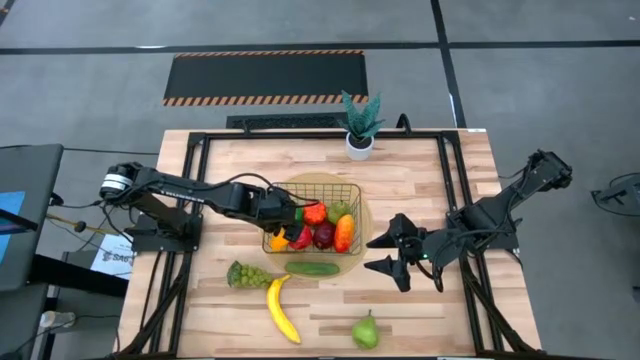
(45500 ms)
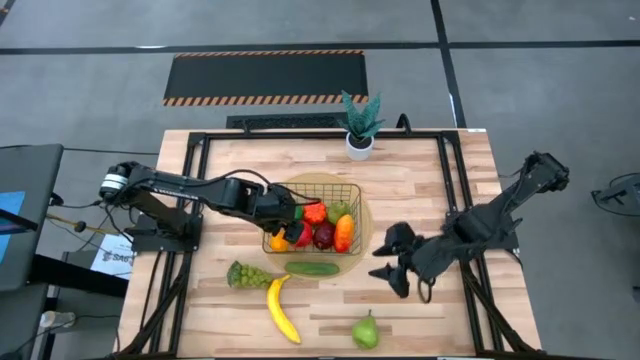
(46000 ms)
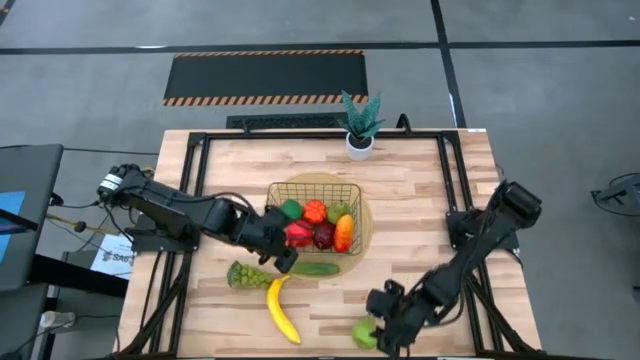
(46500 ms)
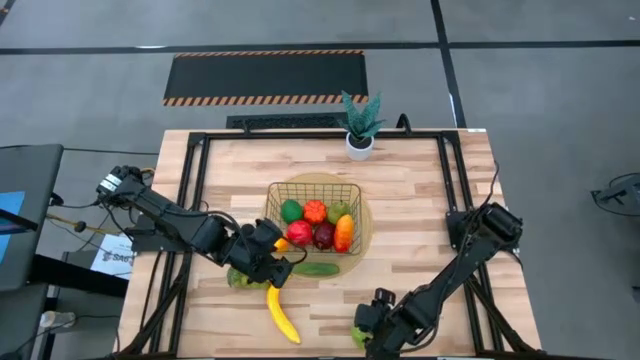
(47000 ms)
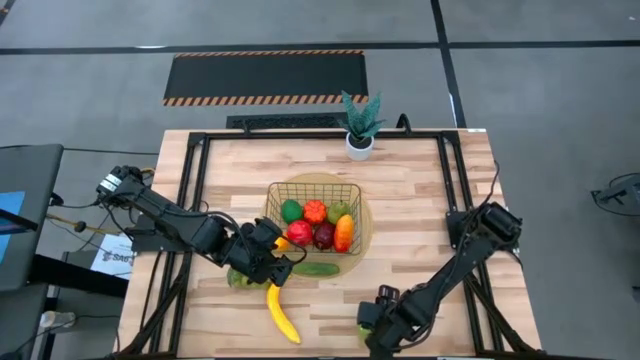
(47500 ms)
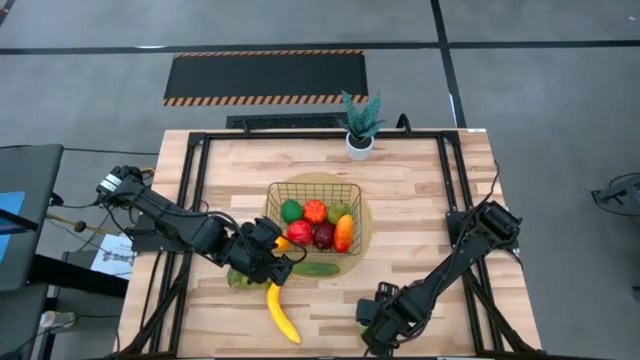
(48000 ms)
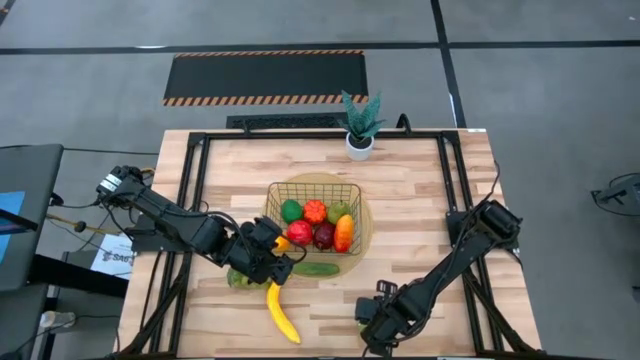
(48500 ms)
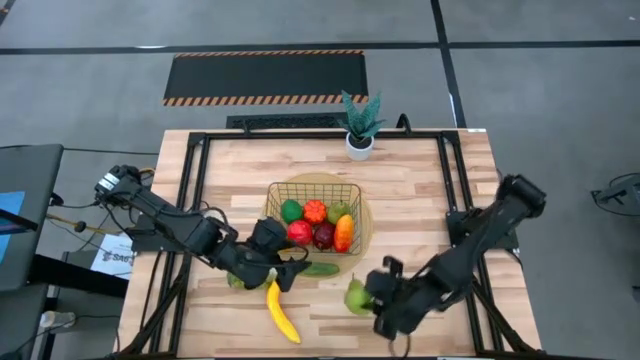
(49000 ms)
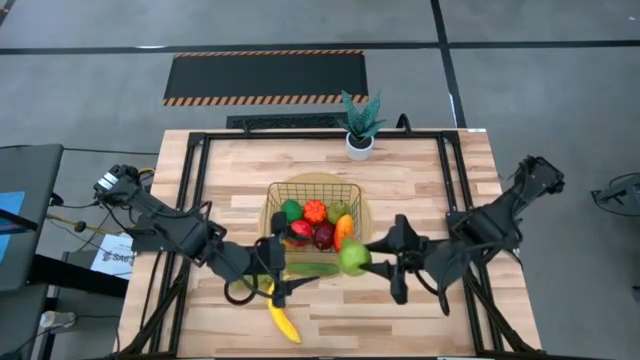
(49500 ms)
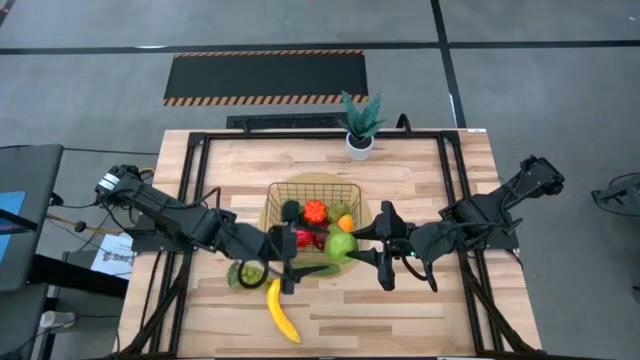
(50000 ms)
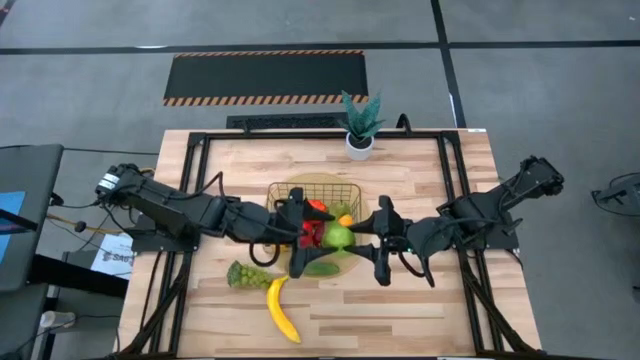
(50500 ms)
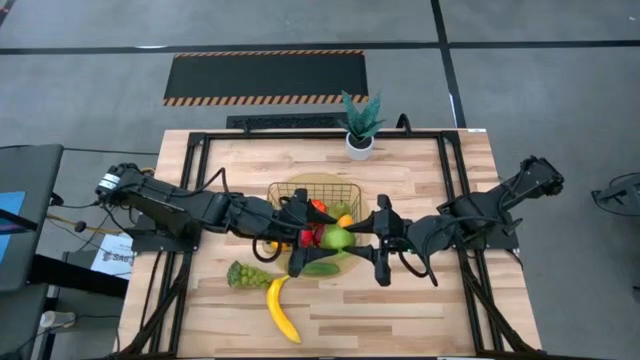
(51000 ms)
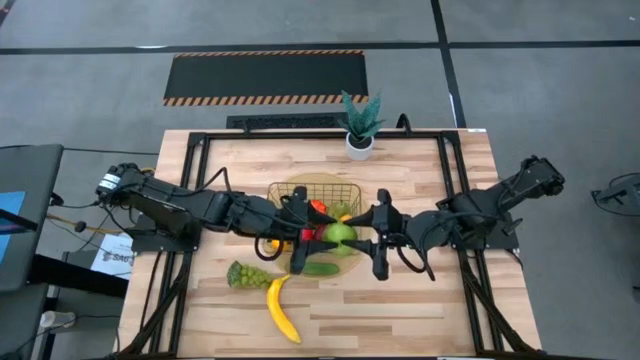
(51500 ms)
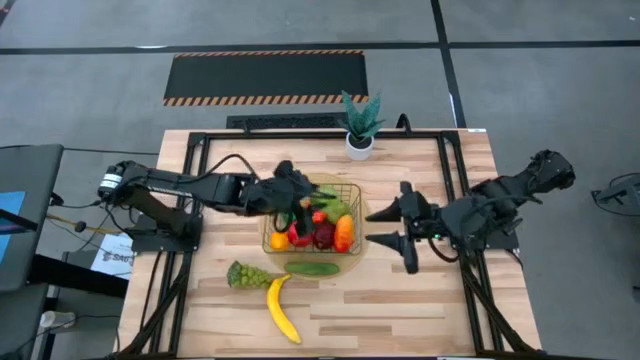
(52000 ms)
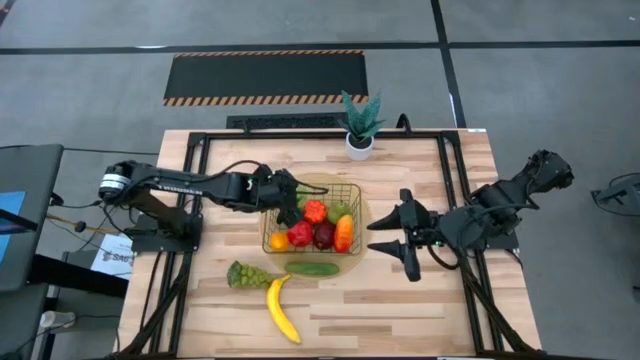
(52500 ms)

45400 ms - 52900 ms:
Task: Build produce basket
Put the pear into the silver basket

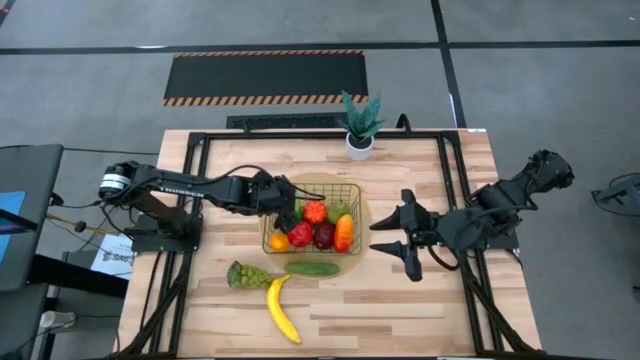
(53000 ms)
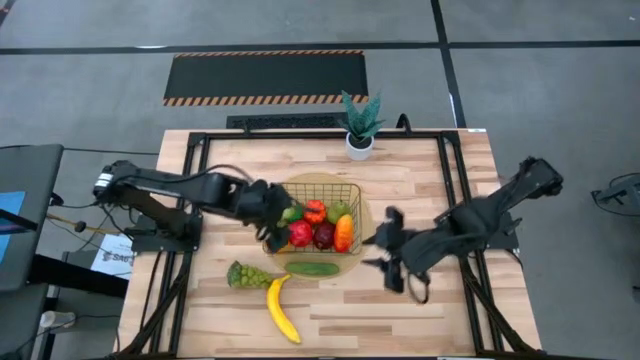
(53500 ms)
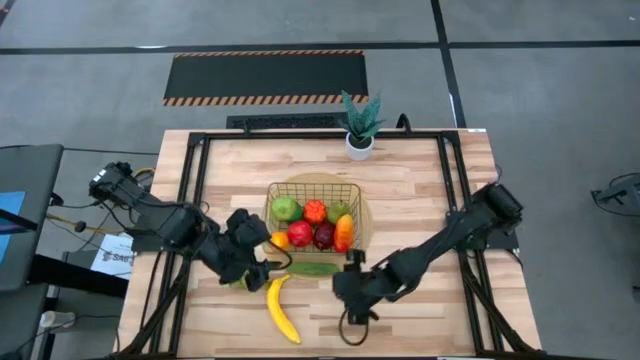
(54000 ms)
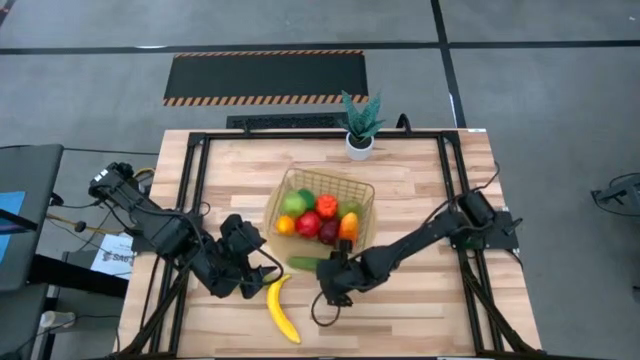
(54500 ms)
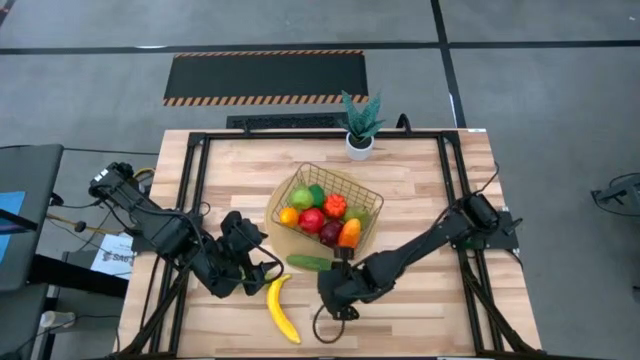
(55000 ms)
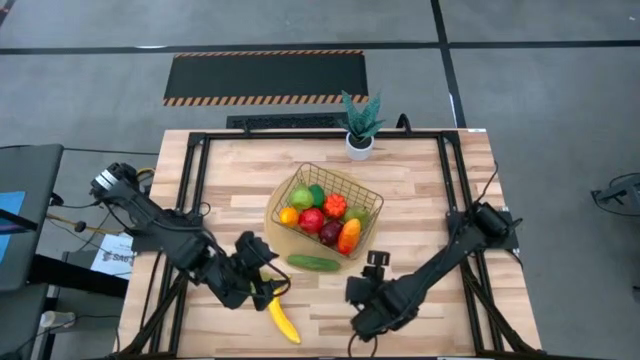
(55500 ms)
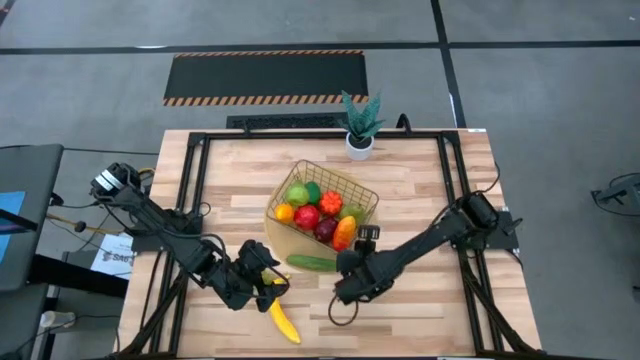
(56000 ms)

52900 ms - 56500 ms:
Put the cucumber into the silver basket

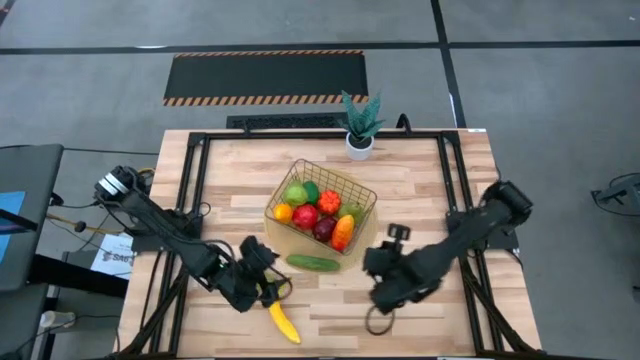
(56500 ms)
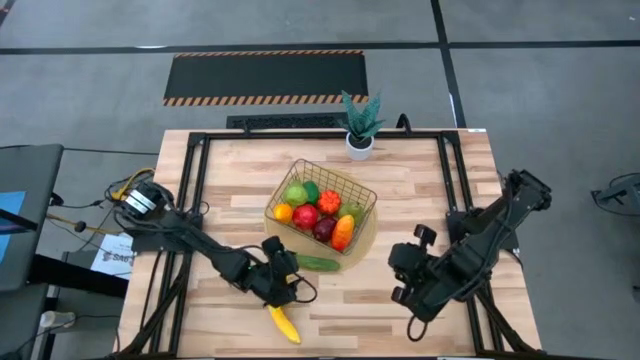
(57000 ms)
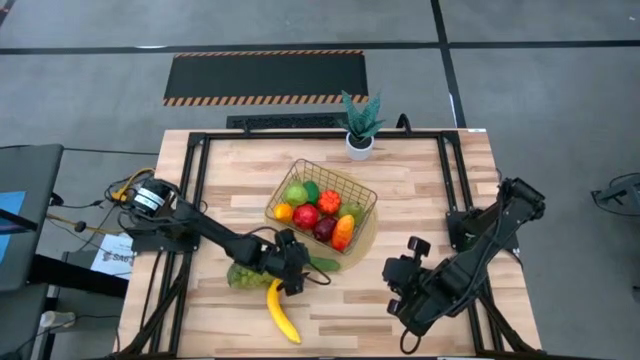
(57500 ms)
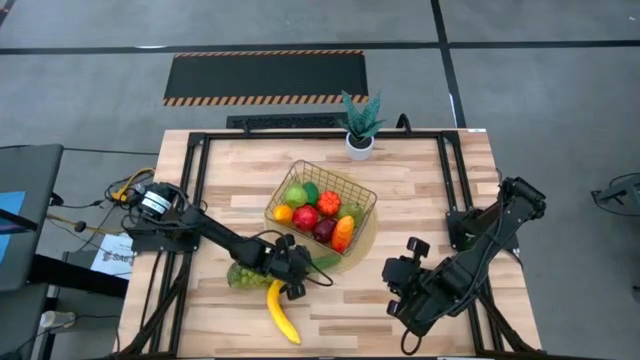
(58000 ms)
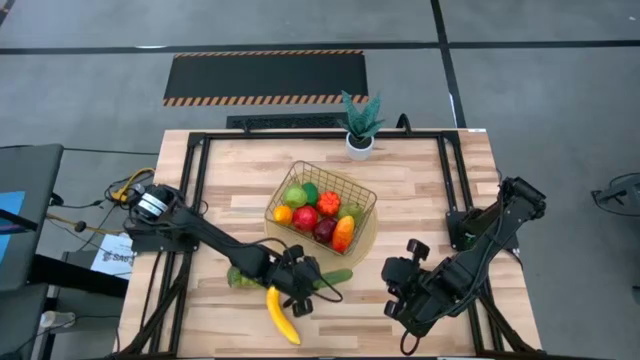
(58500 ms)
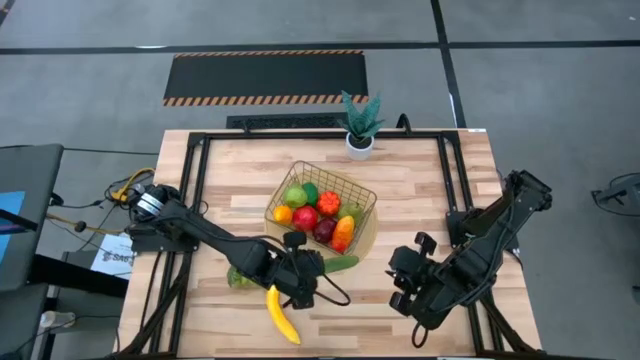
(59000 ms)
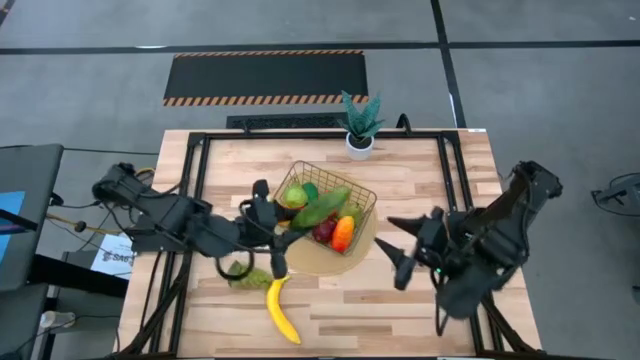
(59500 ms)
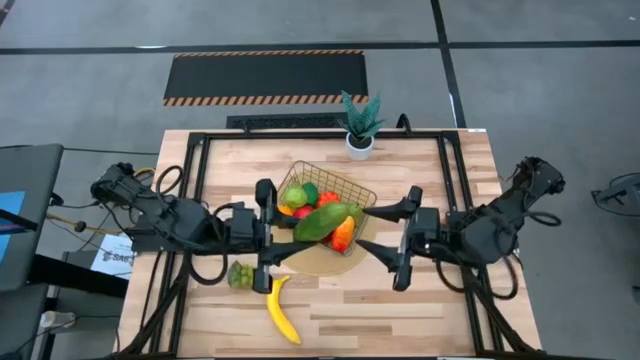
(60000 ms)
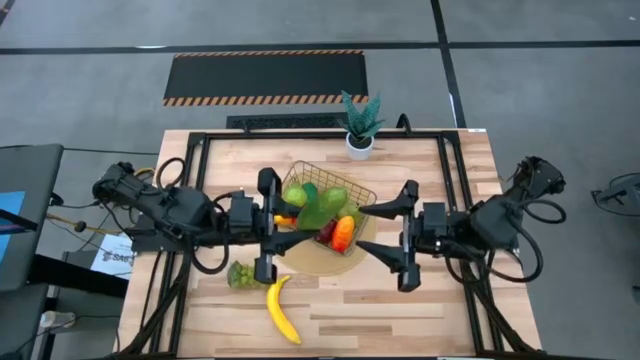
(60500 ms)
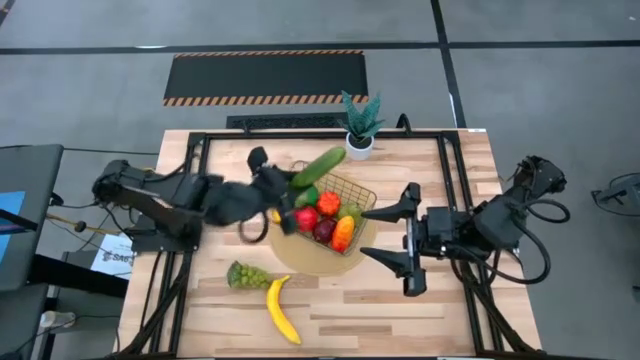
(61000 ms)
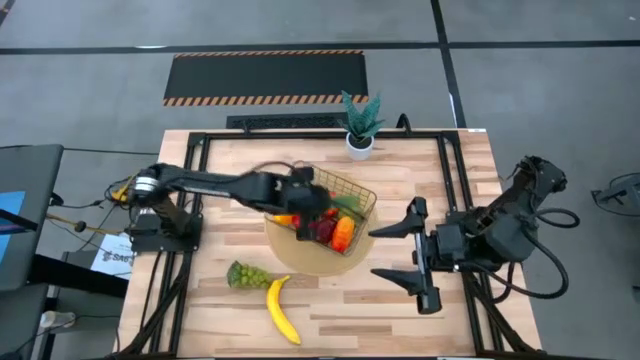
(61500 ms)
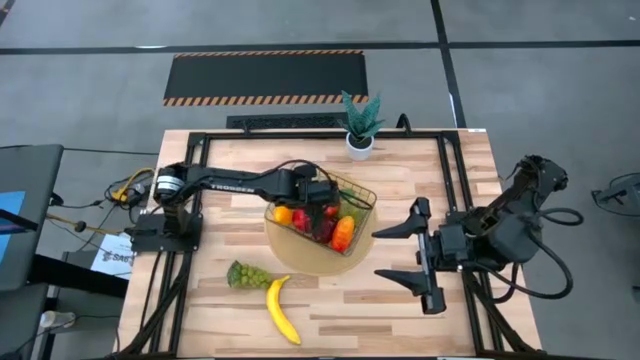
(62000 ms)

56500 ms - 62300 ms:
Put the cucumber into the silver basket

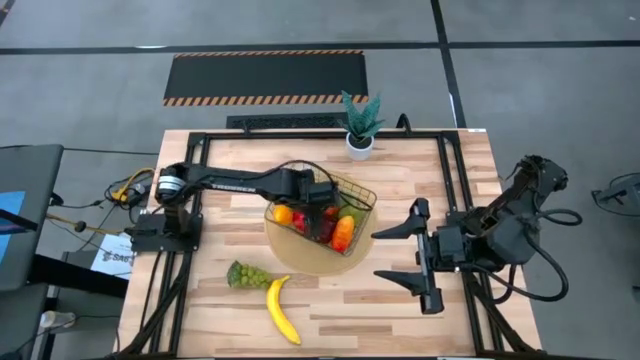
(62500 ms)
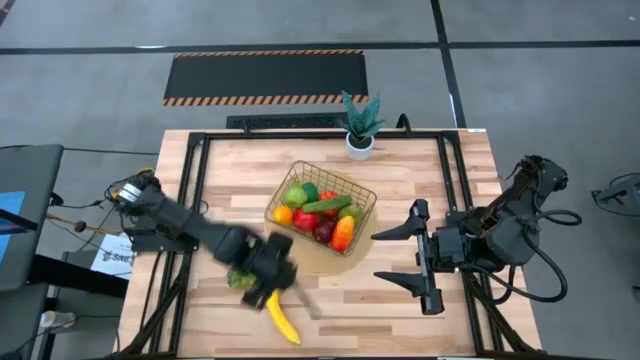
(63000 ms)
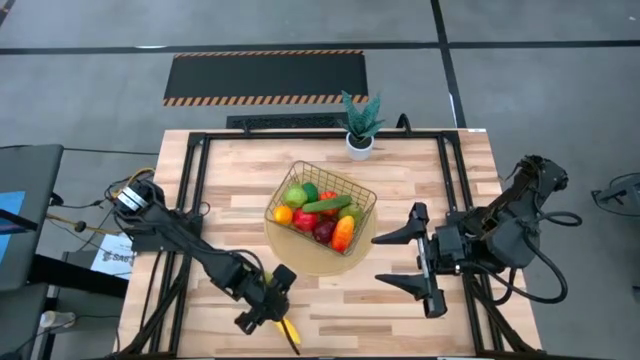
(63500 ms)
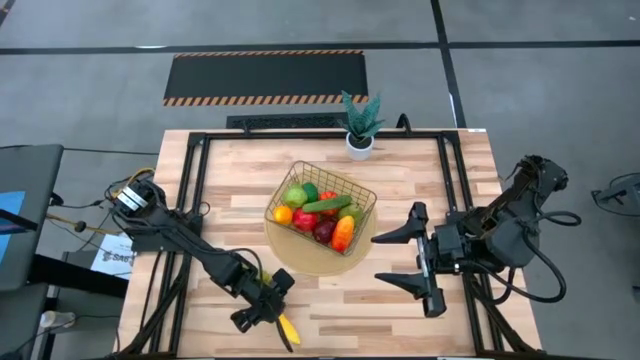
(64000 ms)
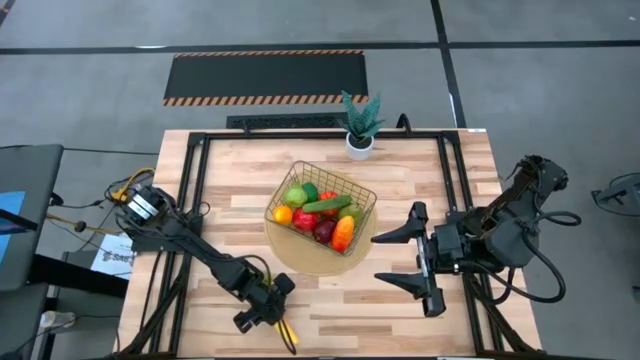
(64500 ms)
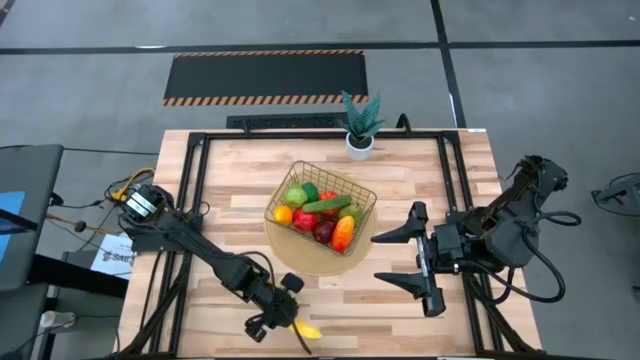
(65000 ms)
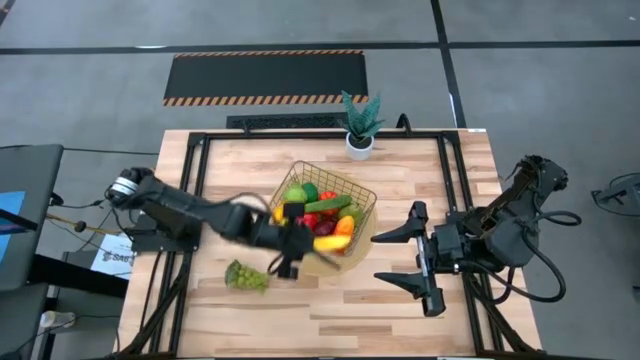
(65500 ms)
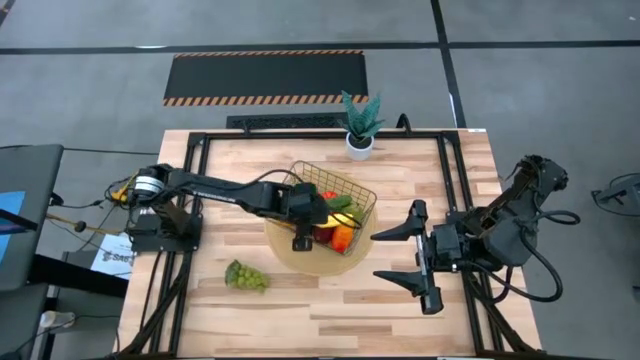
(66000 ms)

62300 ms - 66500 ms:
Put the banana into the silver basket

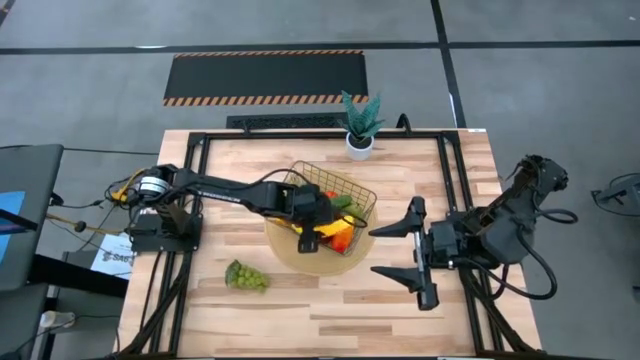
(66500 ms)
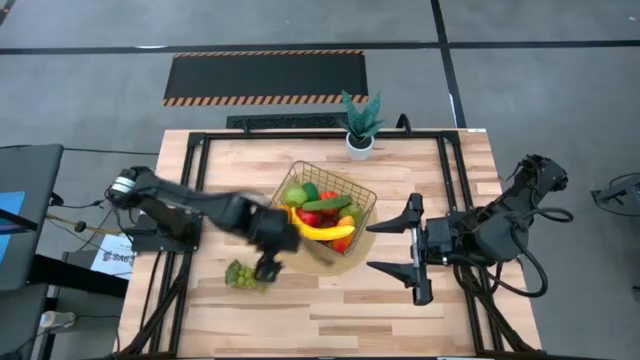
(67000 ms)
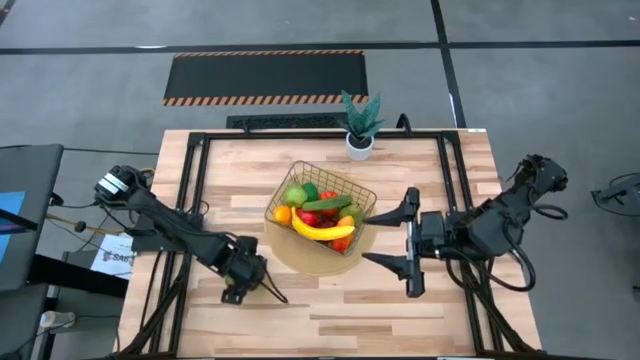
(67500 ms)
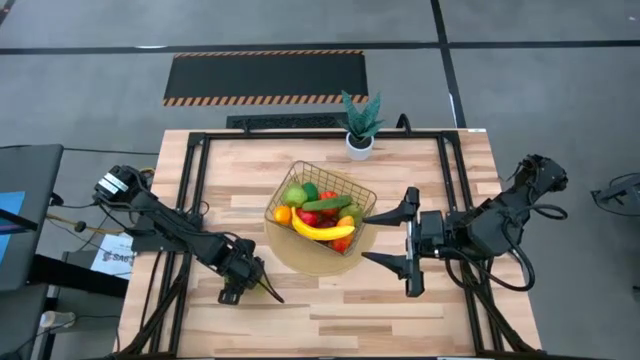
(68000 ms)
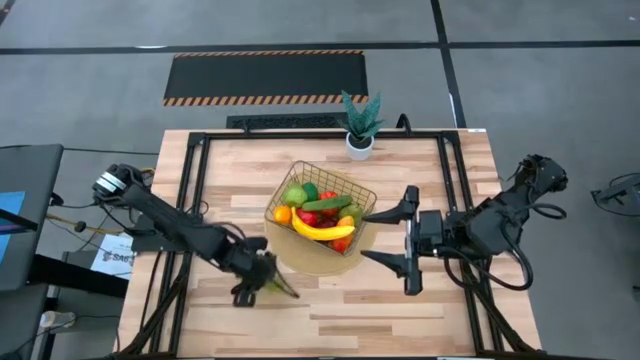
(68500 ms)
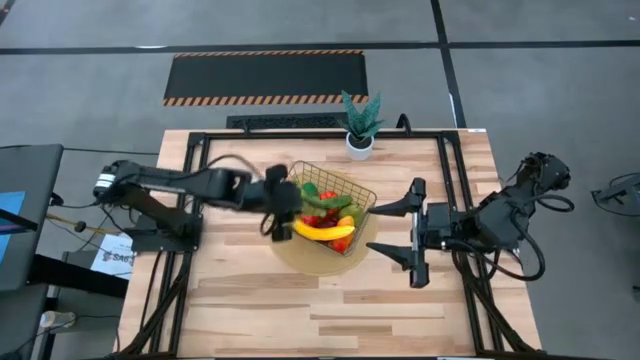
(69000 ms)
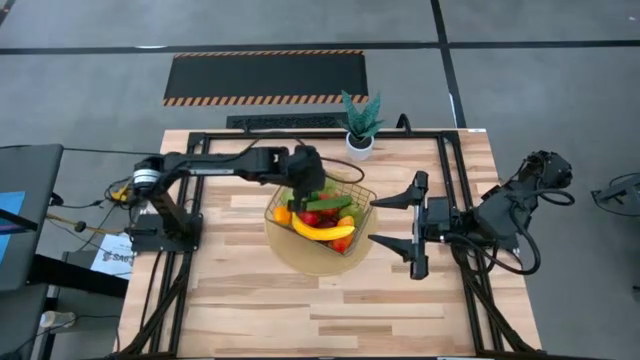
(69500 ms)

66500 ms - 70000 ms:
Put the grapes into the silver basket
